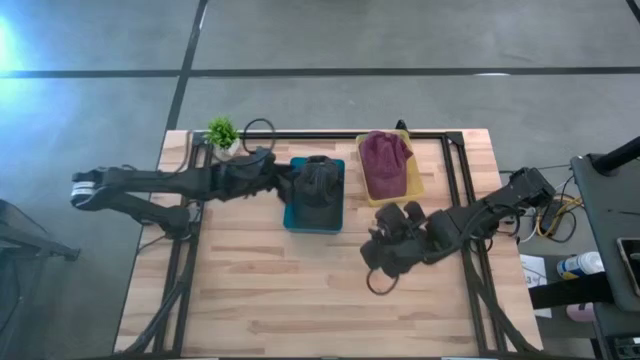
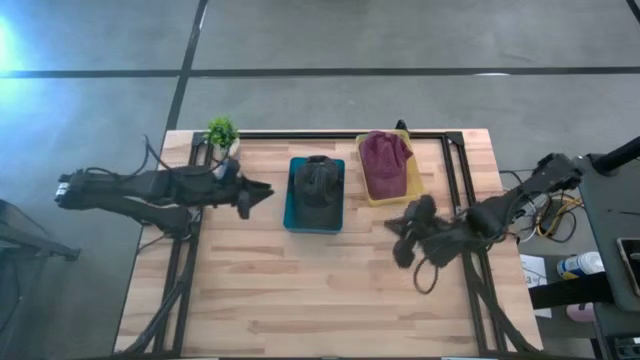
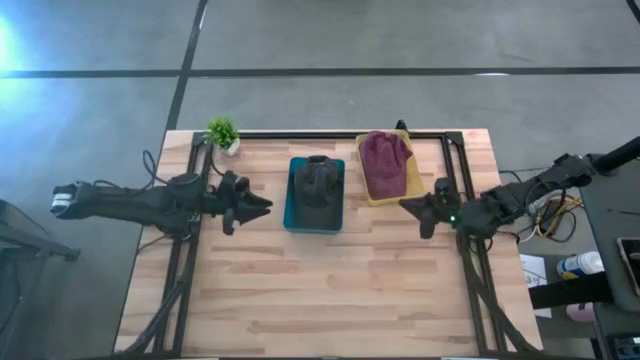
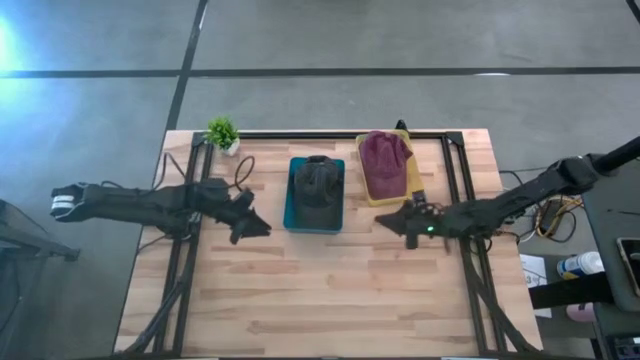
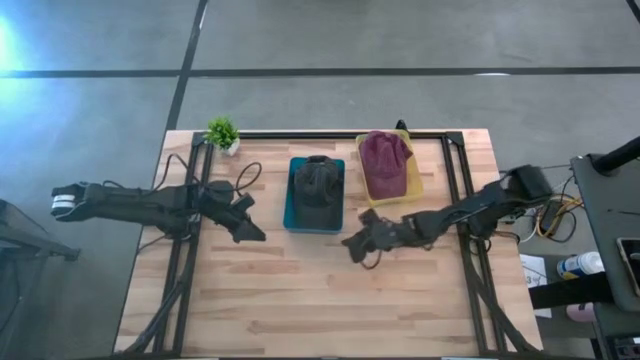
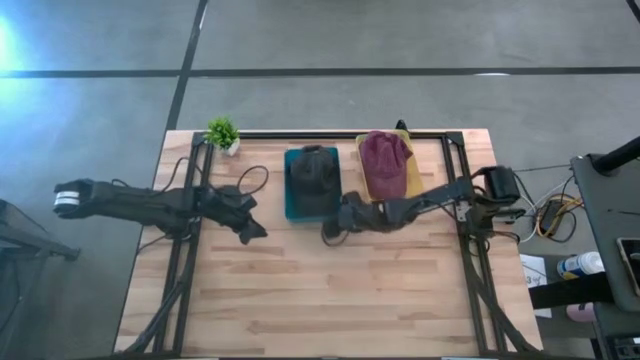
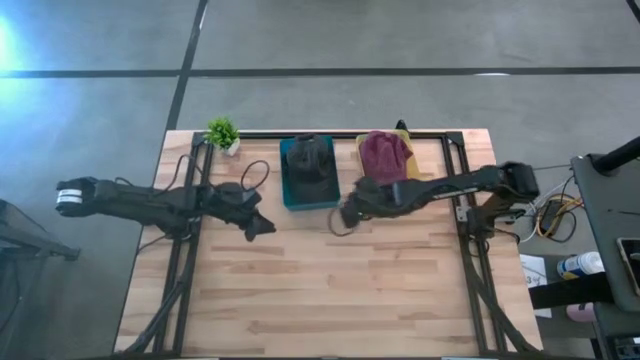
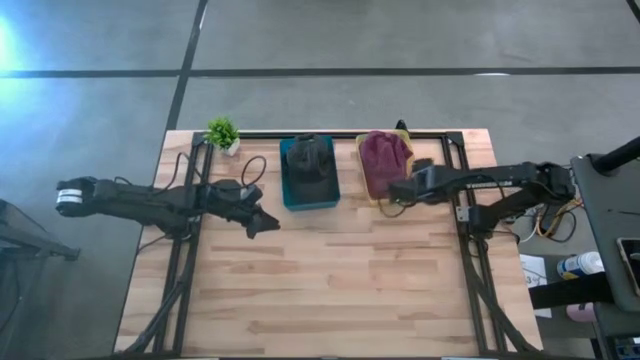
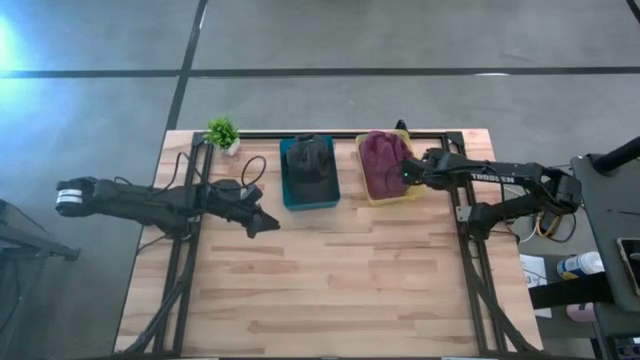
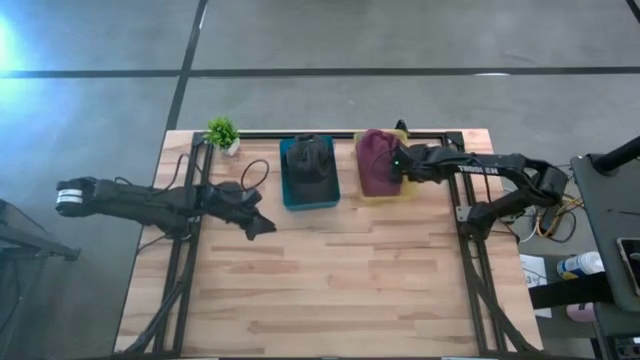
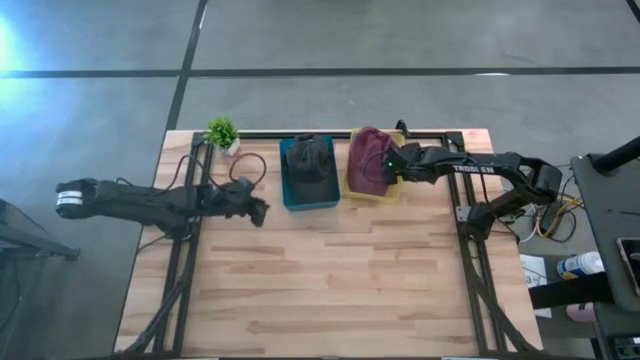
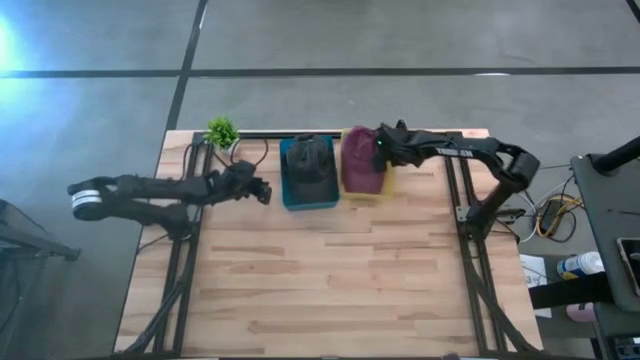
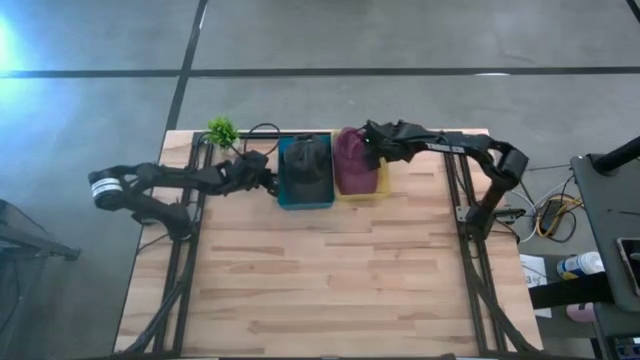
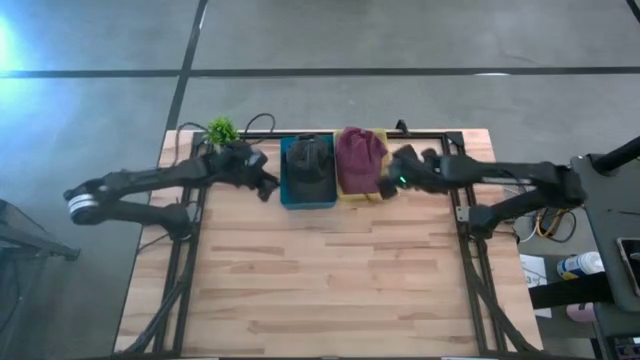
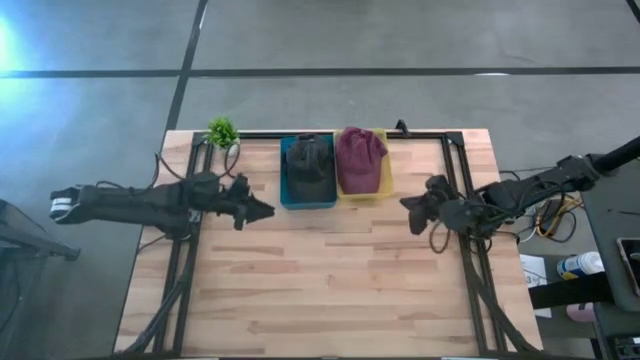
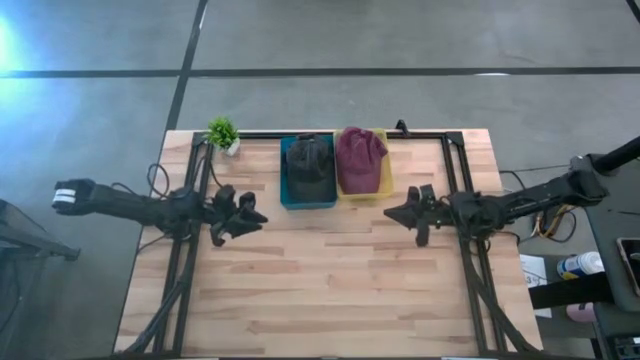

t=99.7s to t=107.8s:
Task: Pick & Place hat
Return to Home Position

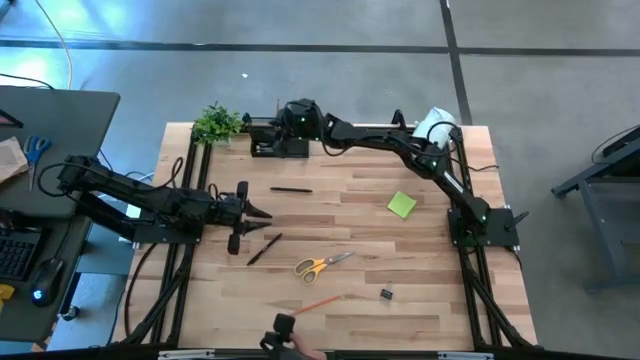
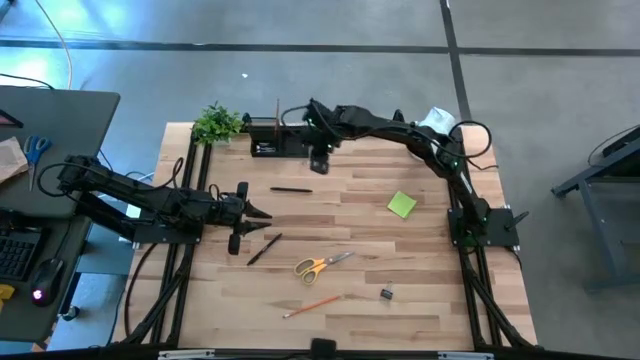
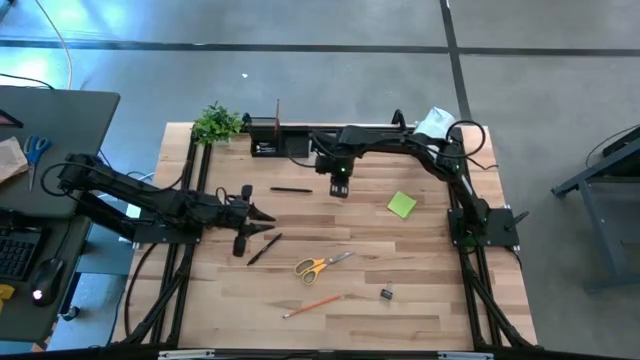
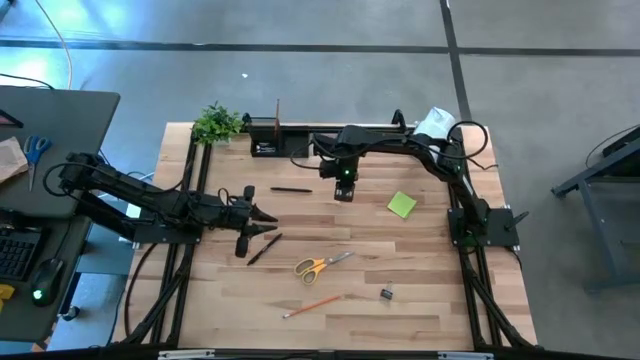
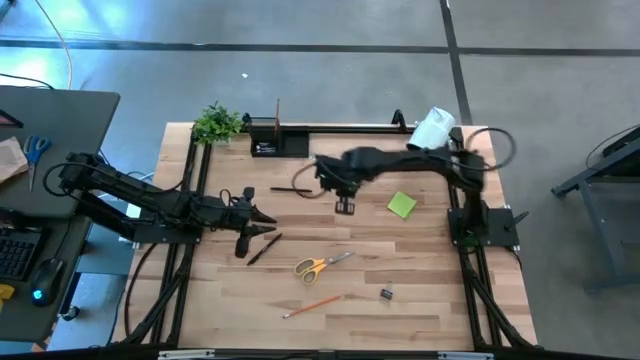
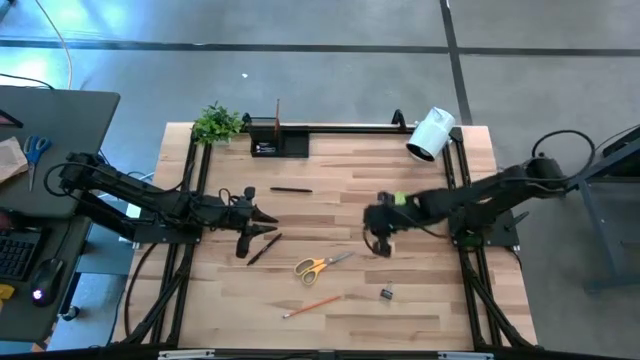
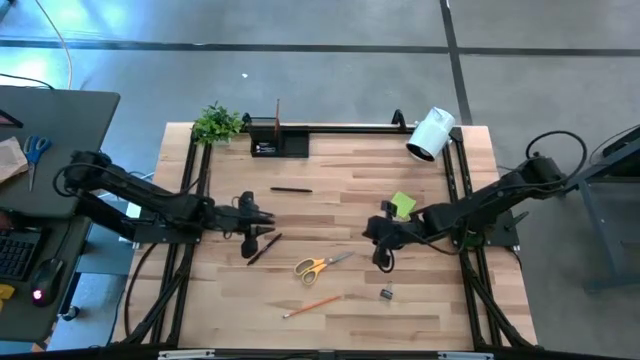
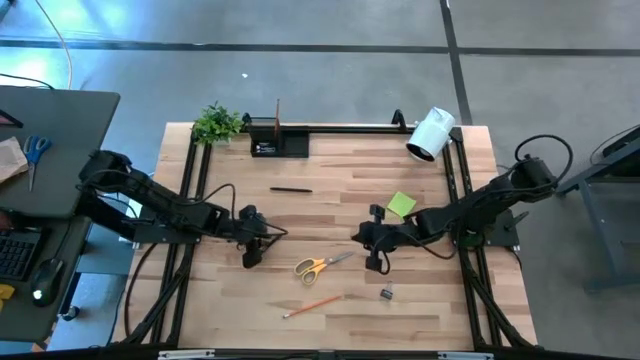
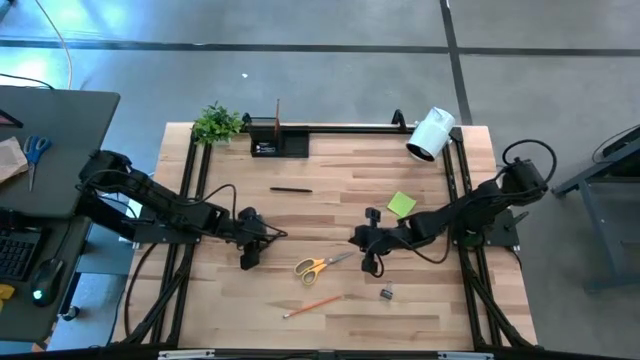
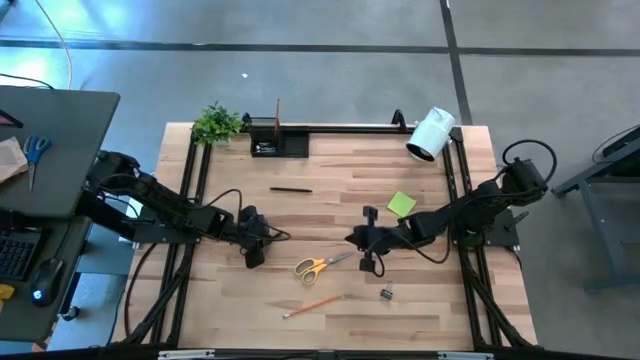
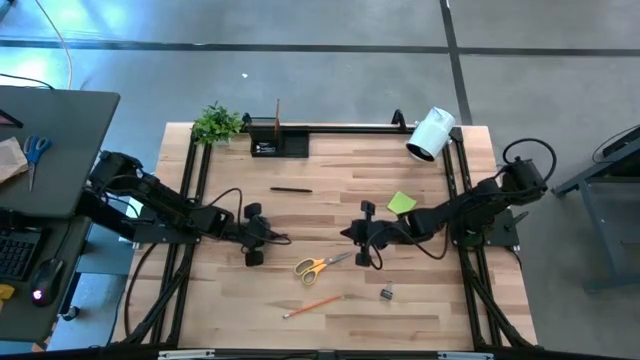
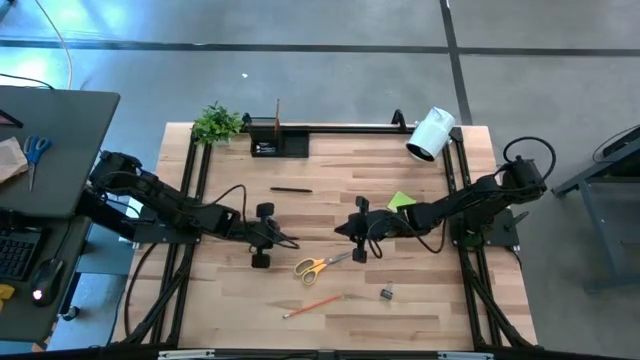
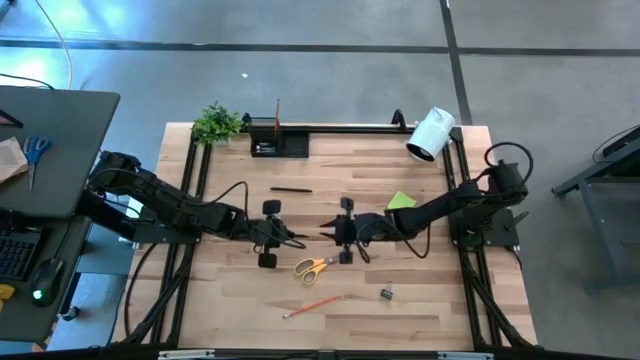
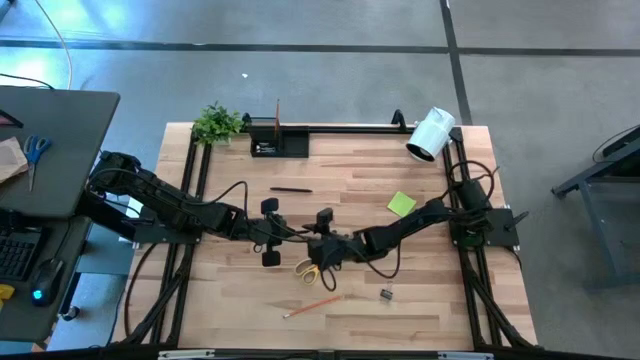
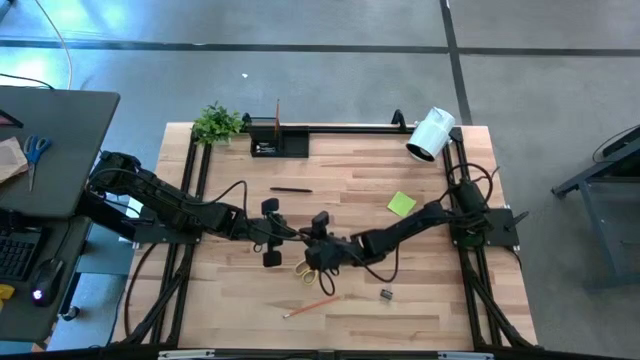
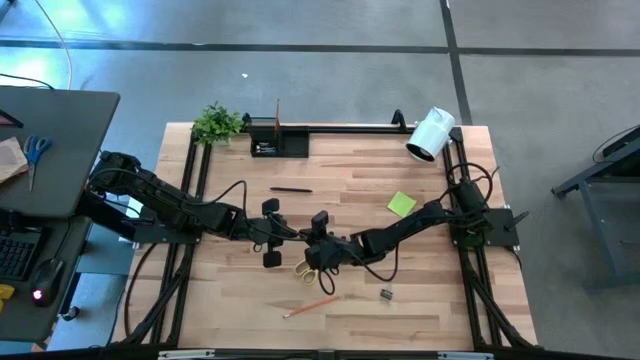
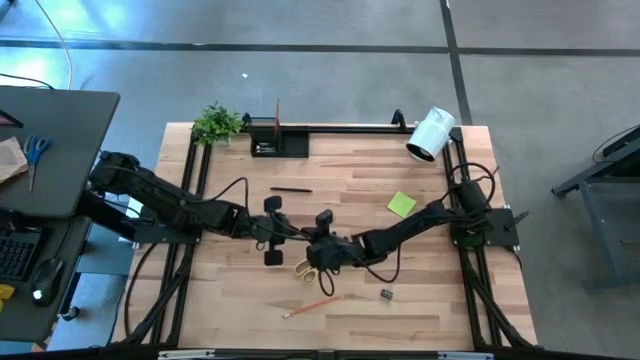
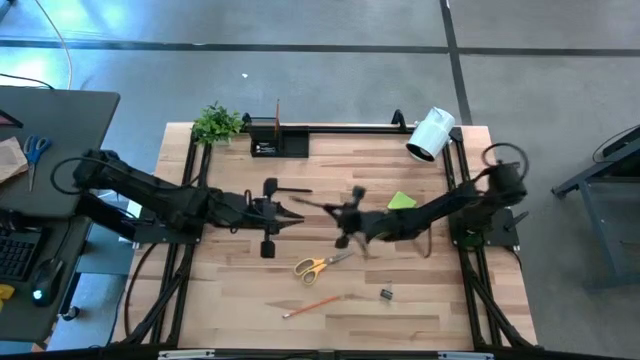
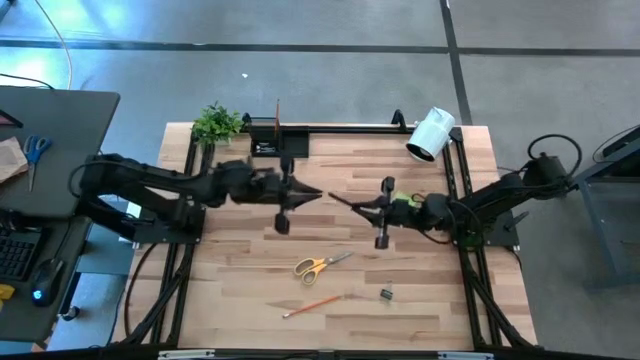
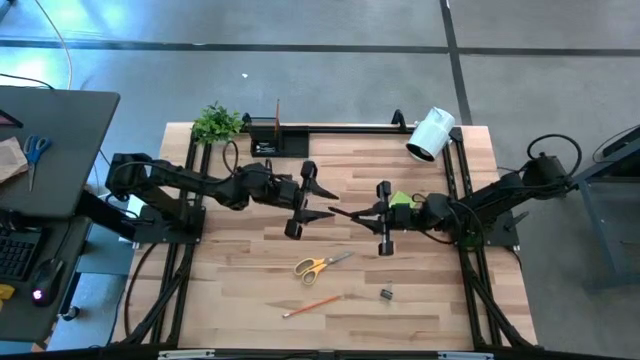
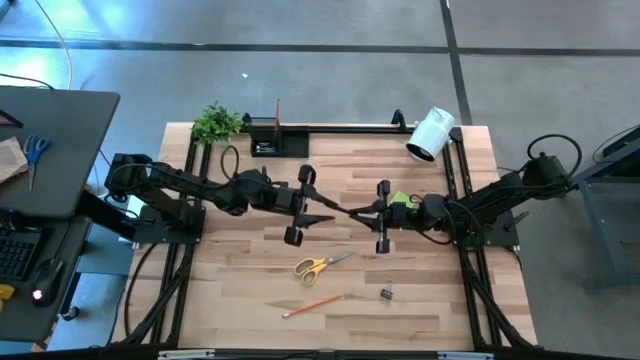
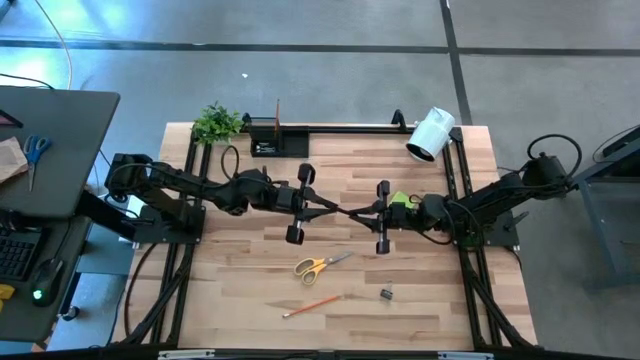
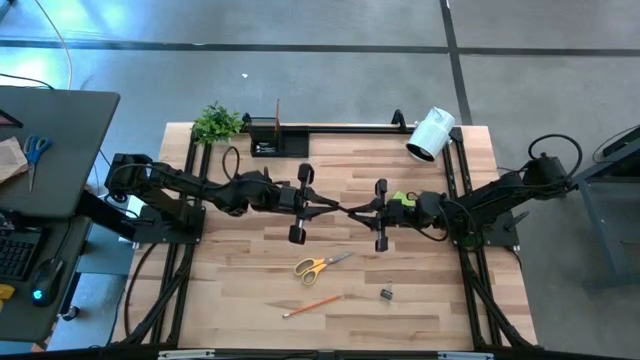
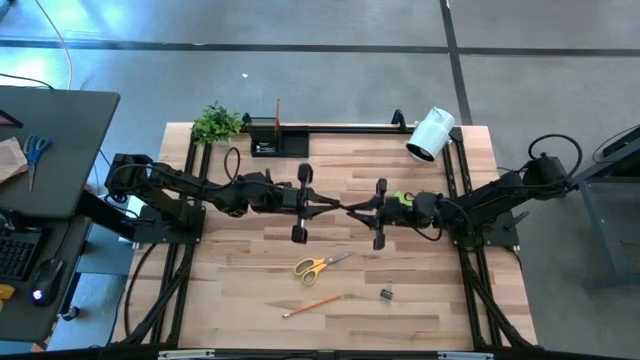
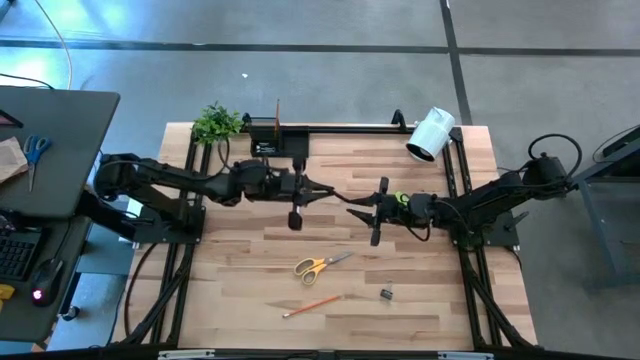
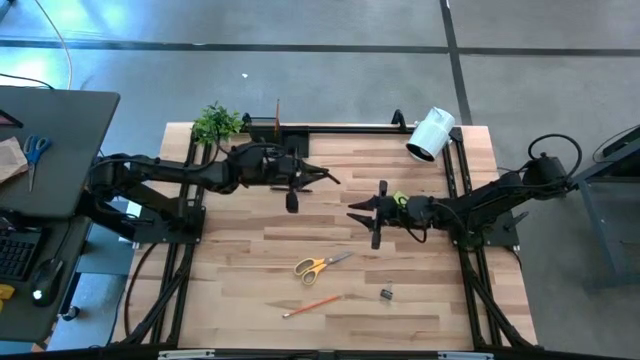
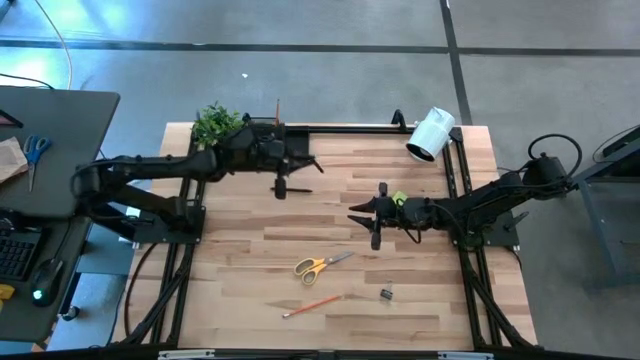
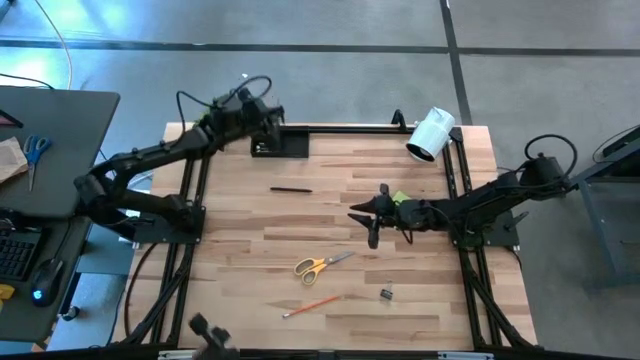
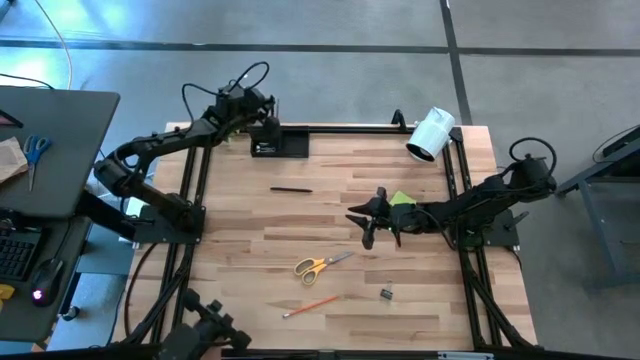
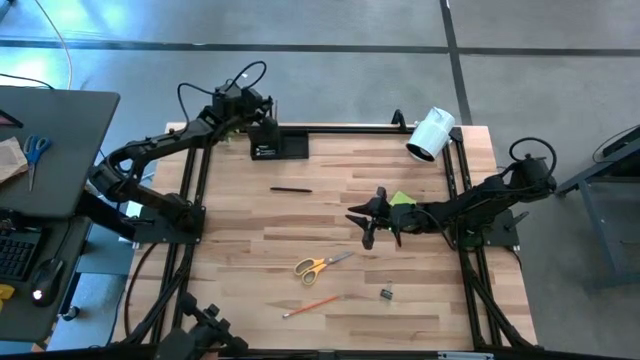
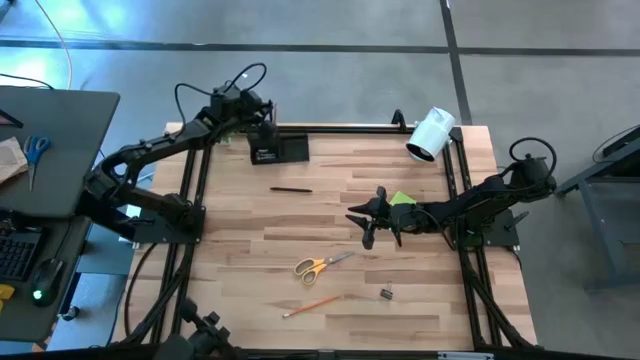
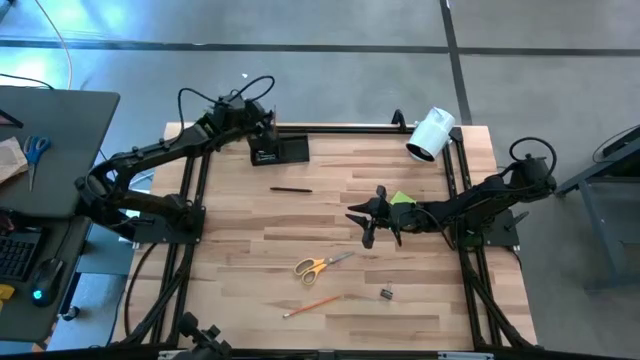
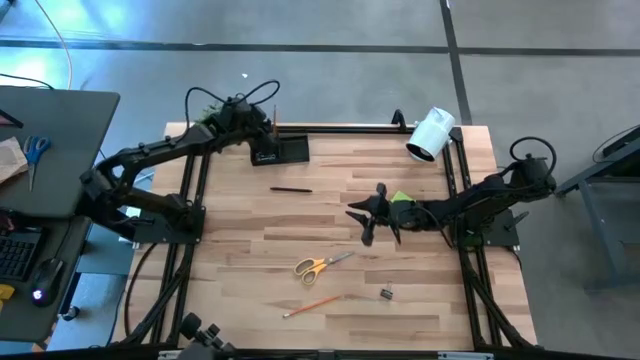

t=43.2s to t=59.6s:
Task: Pick and place office supplies into organizer
Put the bottom black pen into the top left section of the desk organizer
